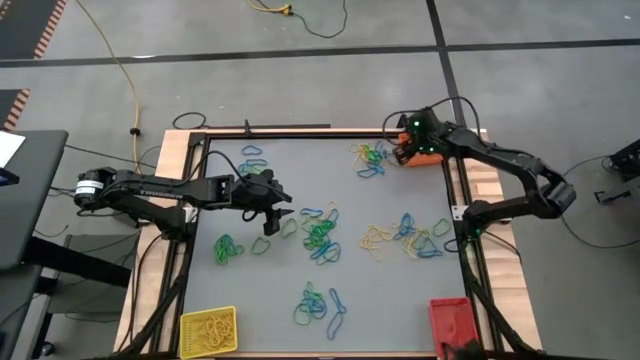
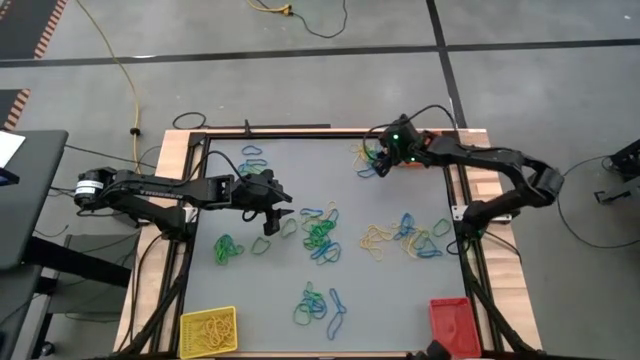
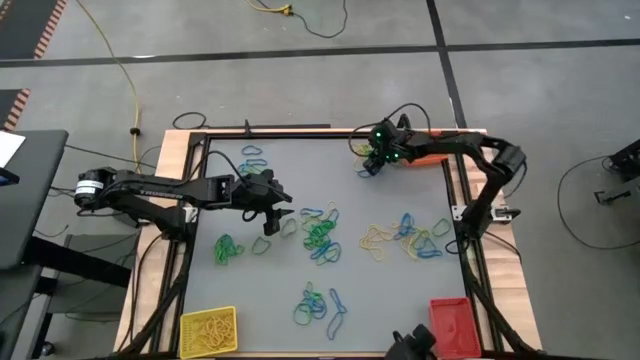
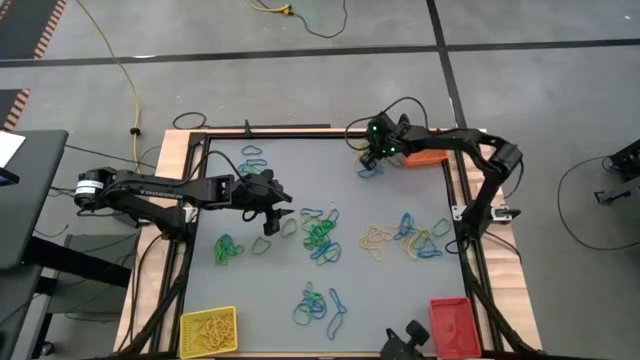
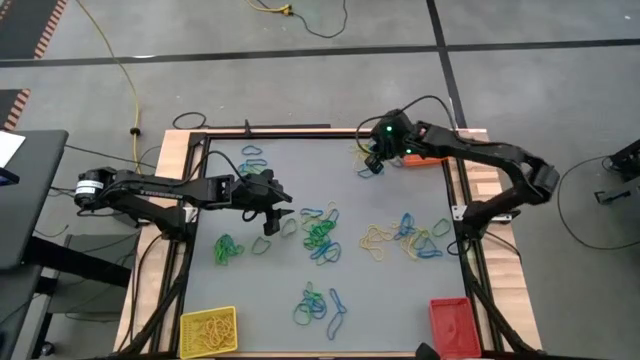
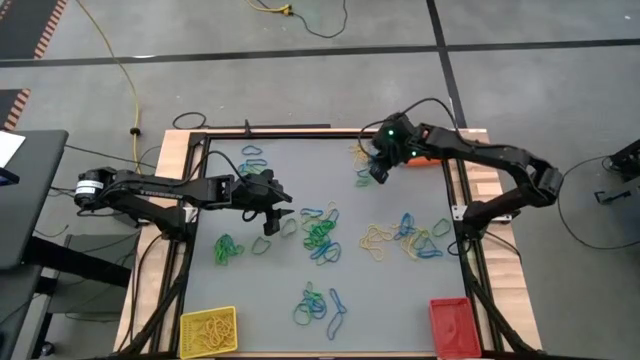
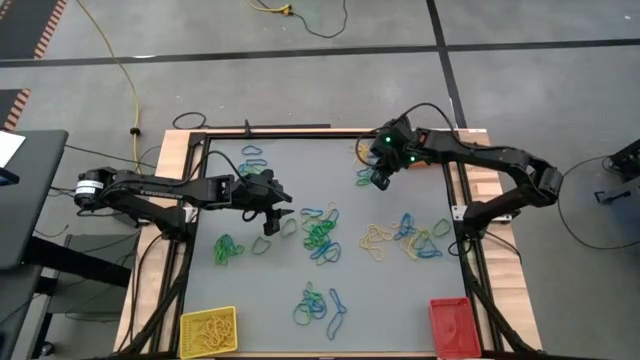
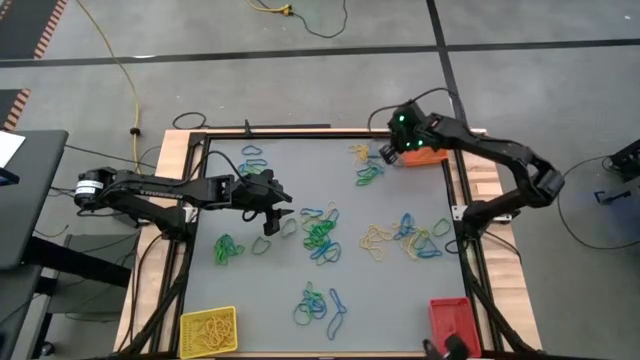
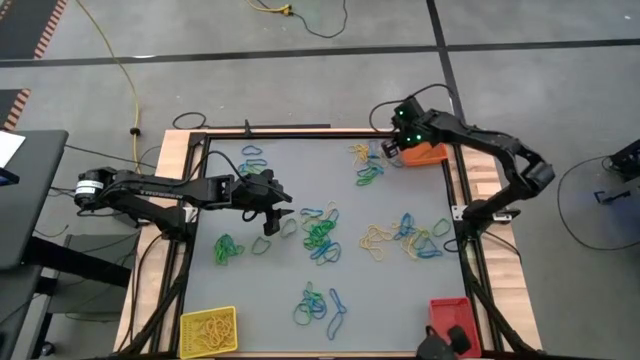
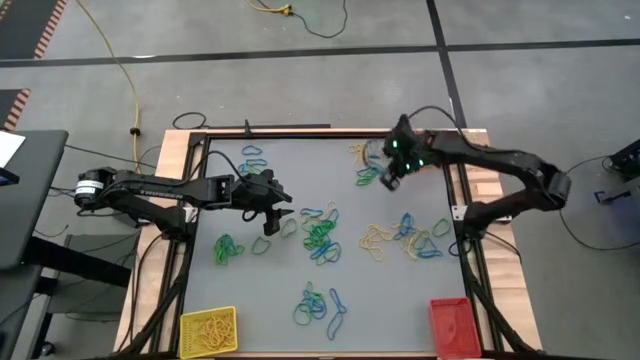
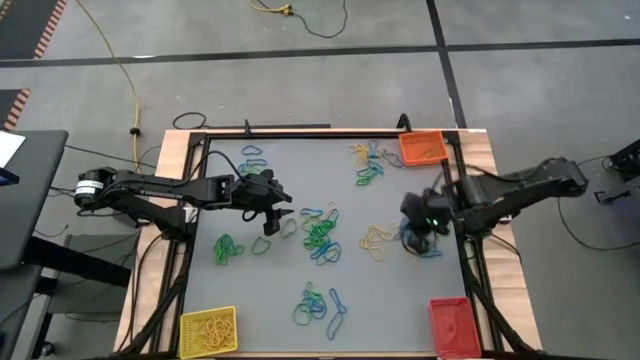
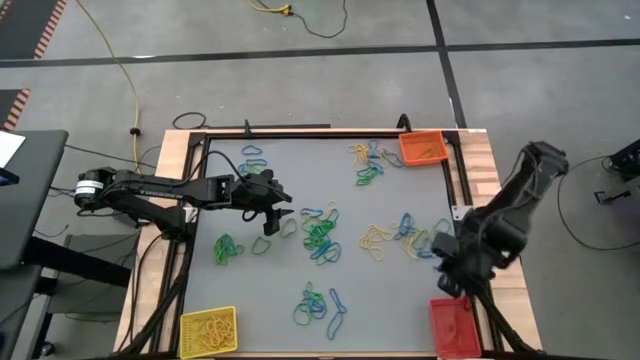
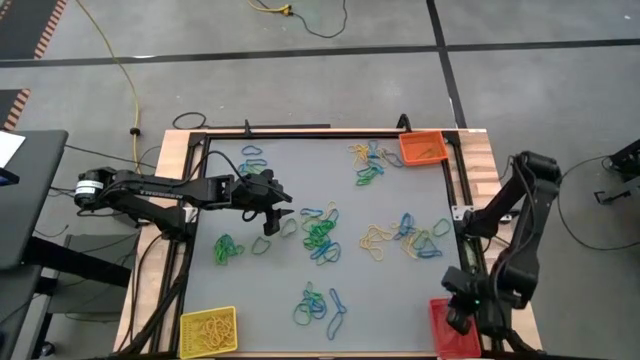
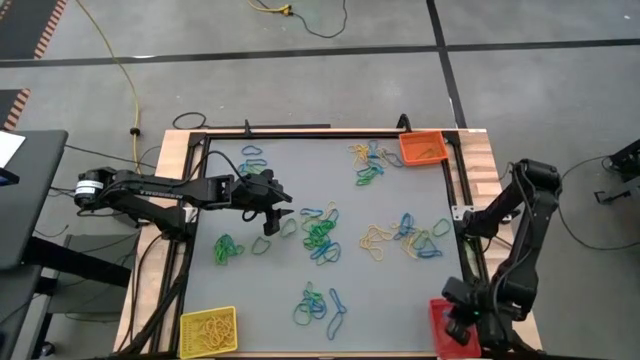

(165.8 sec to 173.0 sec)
Task: Sort rubber bands into baskets
Put the blue rubber band into the red bin

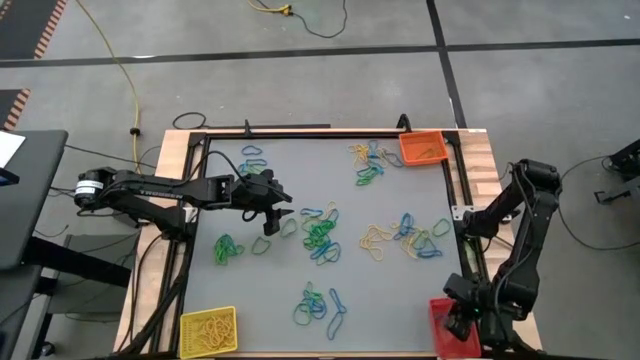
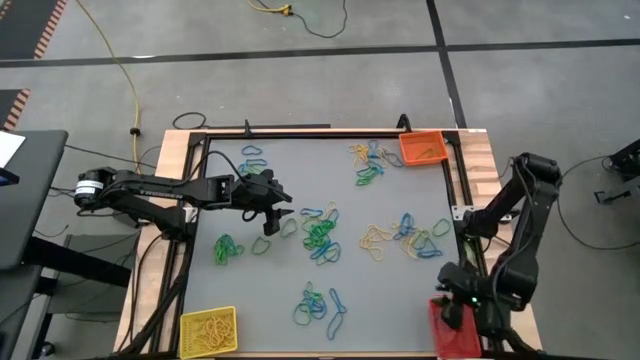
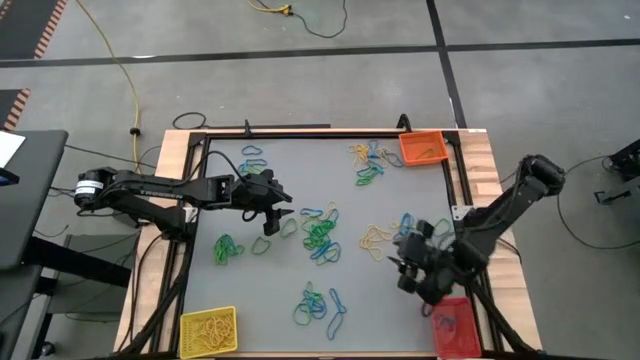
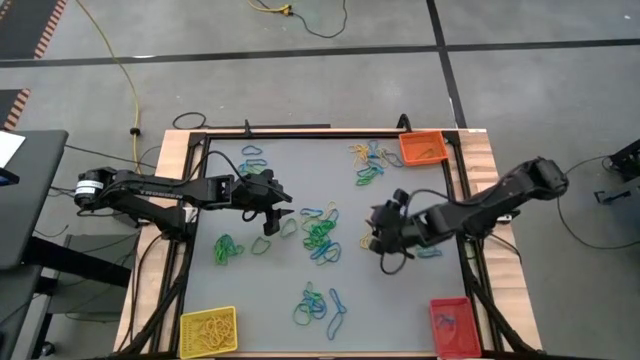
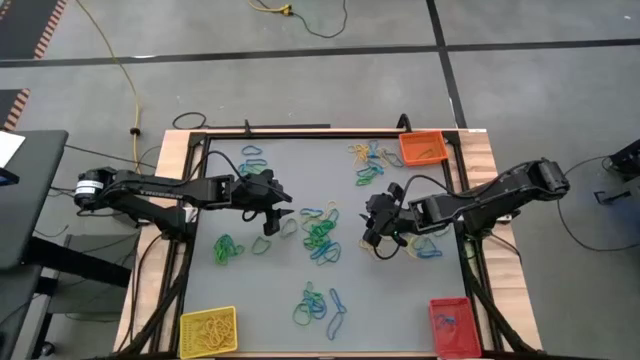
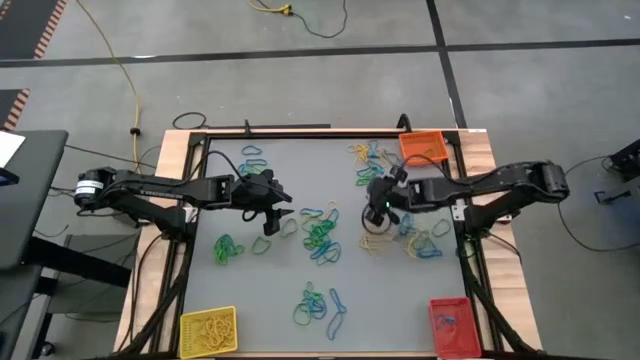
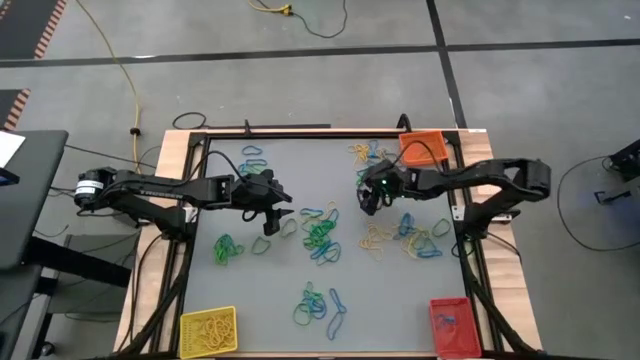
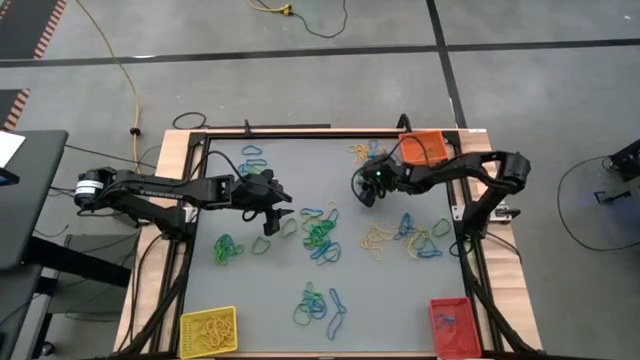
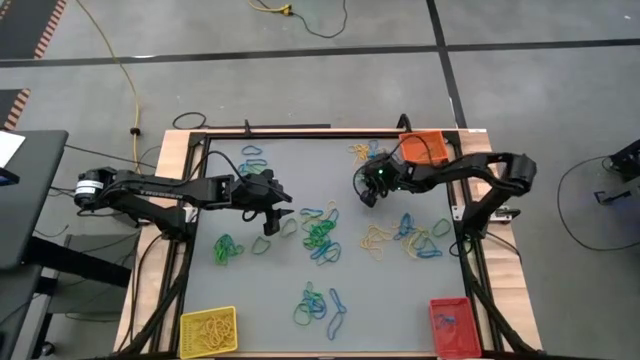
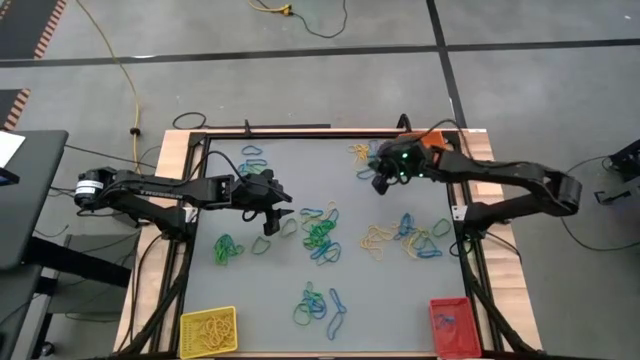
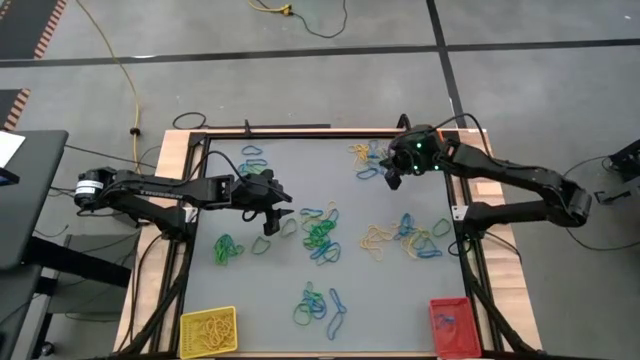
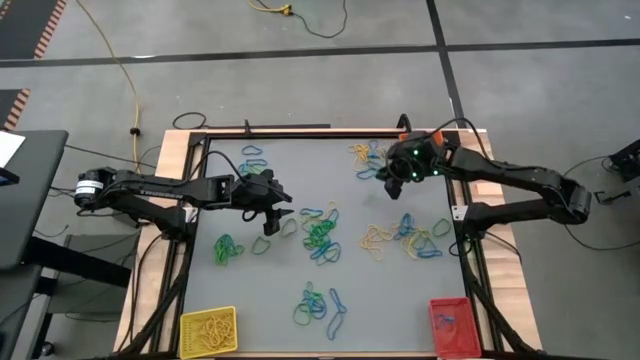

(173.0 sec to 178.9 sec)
Put the green rubber band into the orange bin

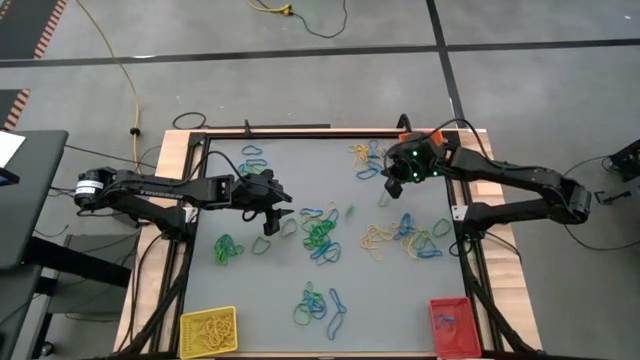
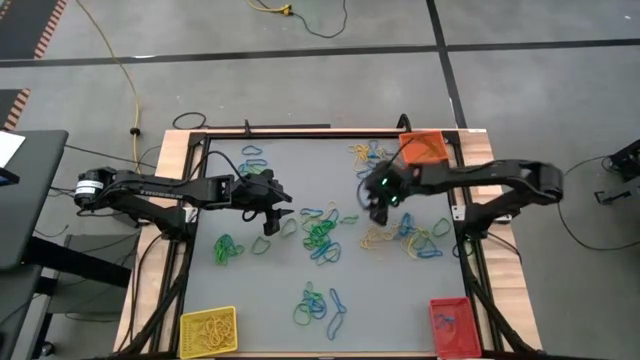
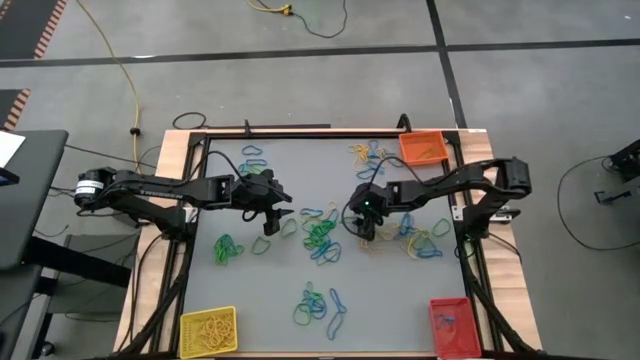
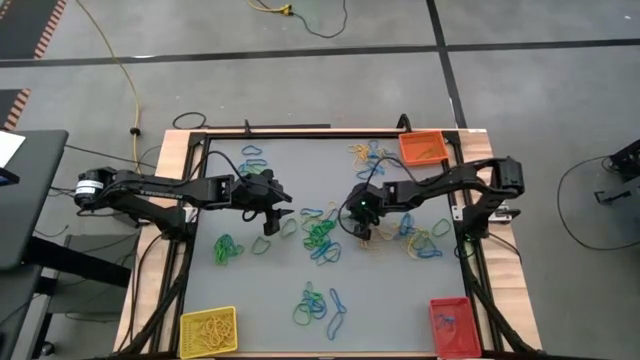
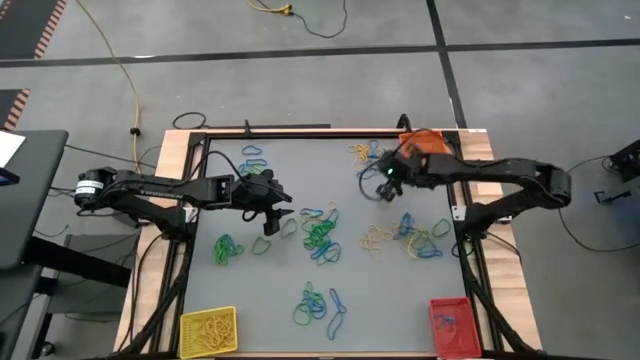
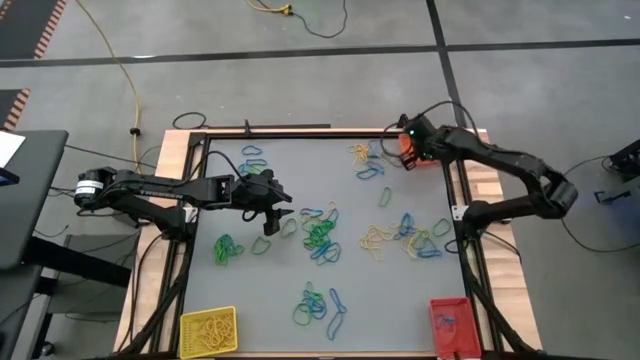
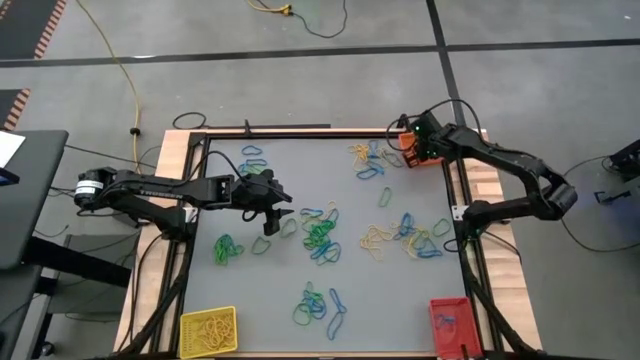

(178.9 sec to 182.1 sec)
Put the green rubber band into the orange bin

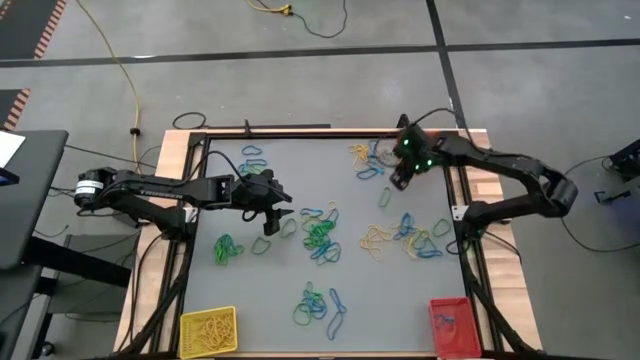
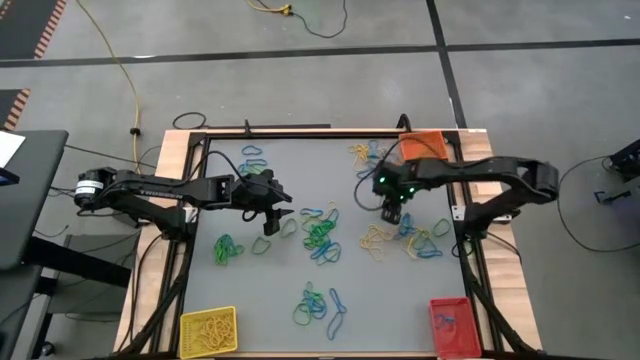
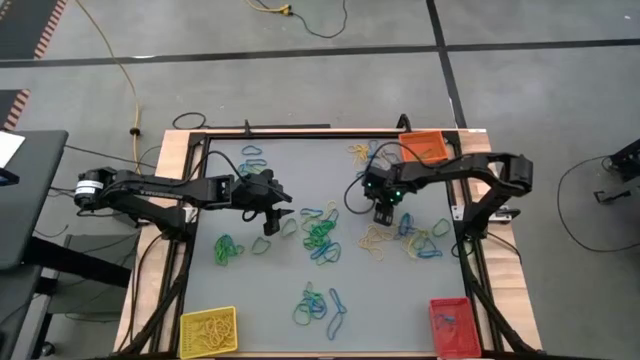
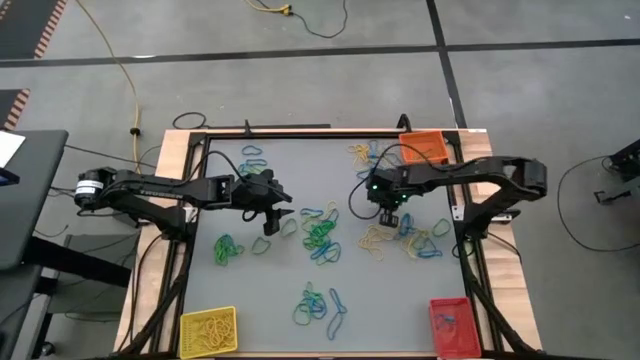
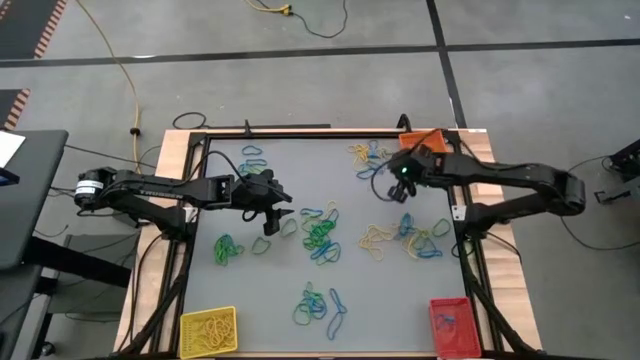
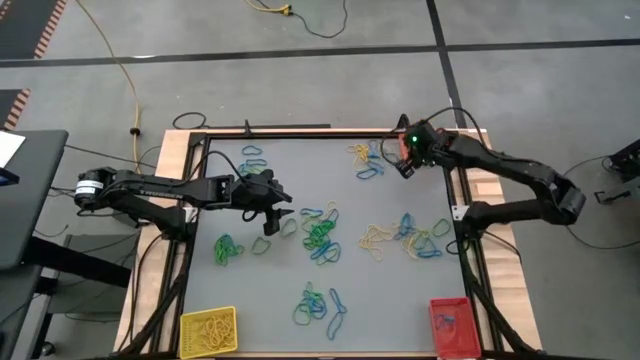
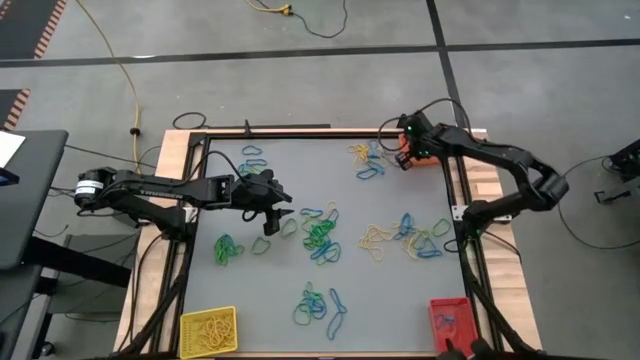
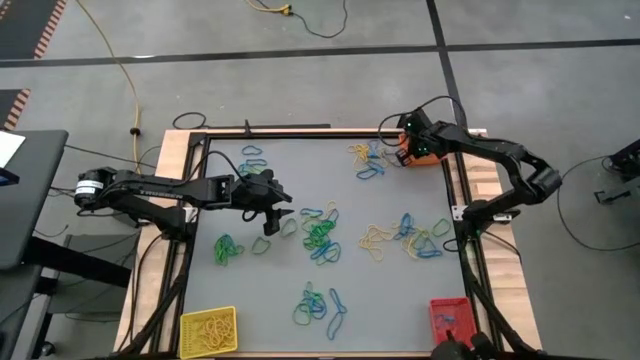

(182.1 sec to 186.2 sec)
Put the green rubber band into the orange bin

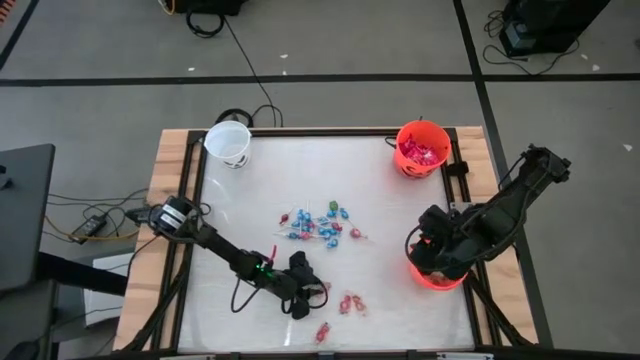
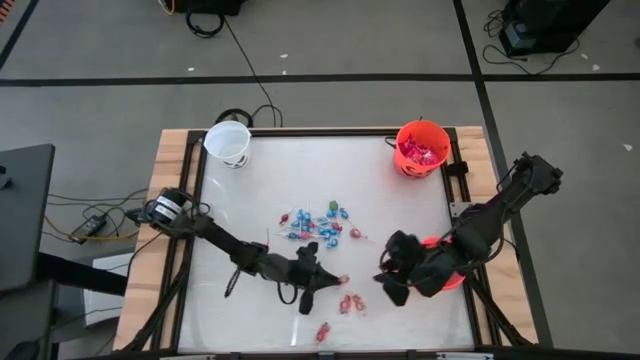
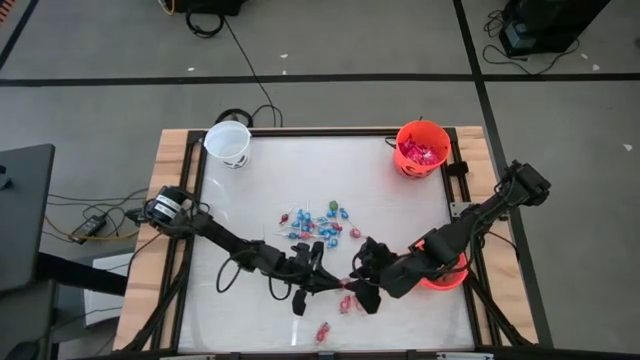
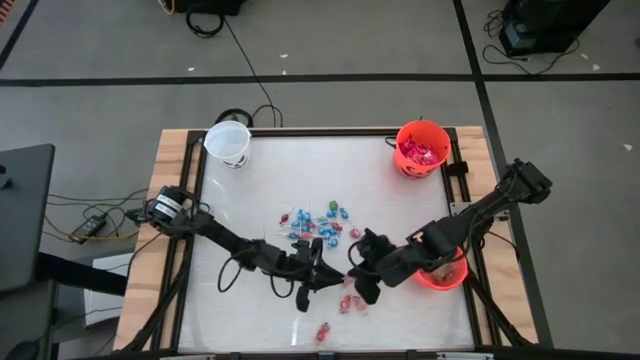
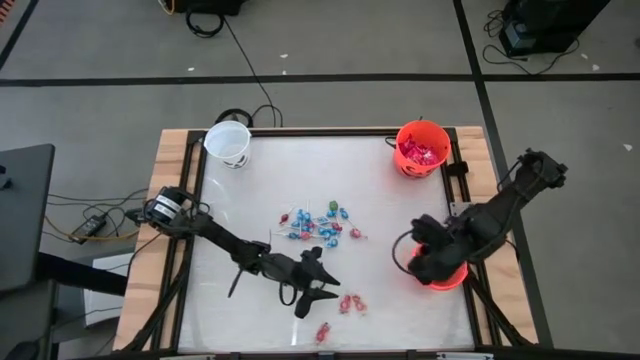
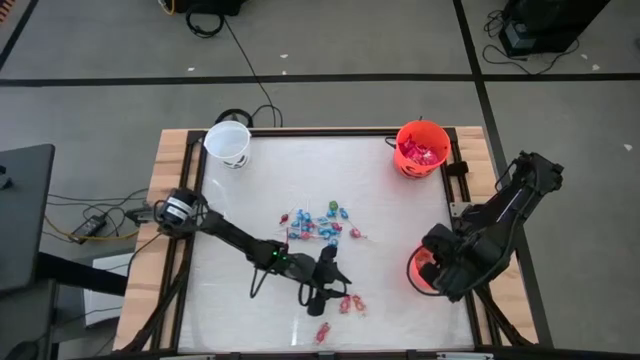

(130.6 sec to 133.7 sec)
Task: Sort candy by brand, put in halloween buckets
Put the orange gummy into the bottom orange bucket
